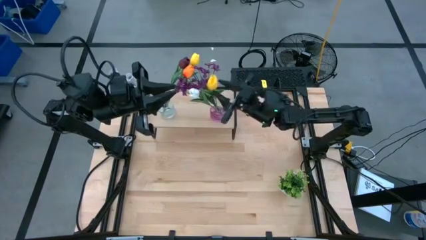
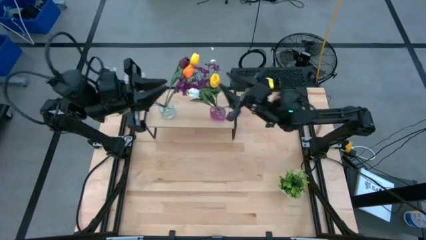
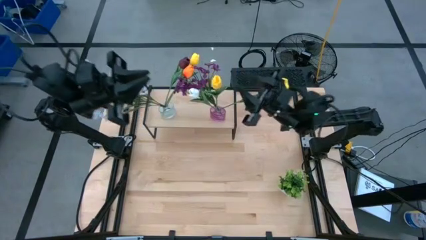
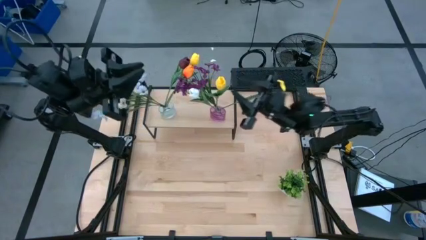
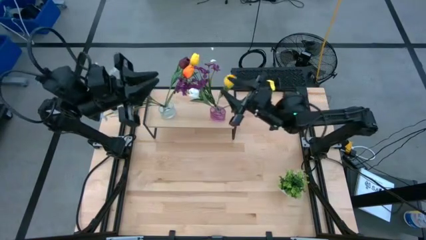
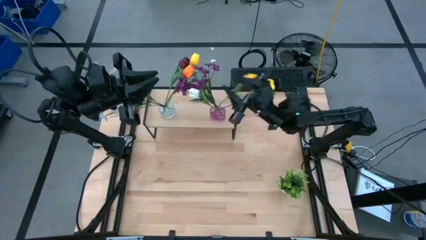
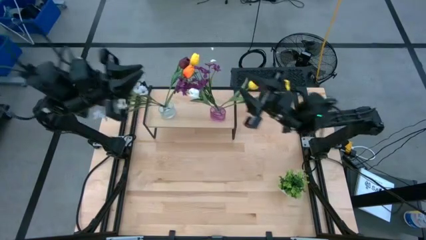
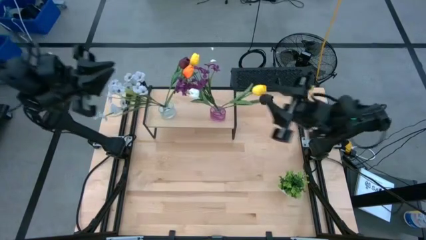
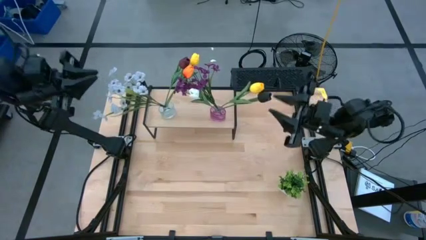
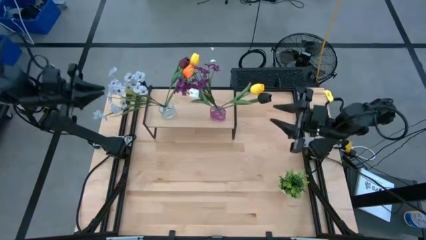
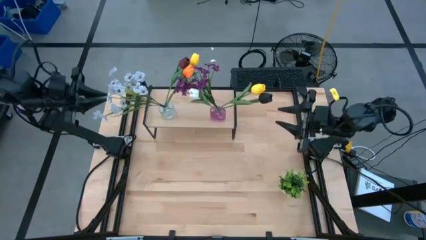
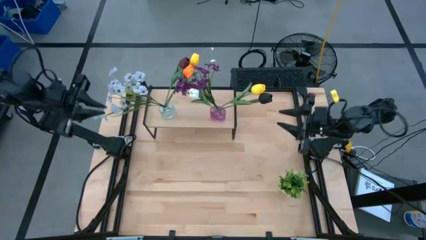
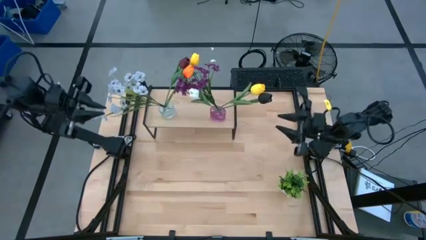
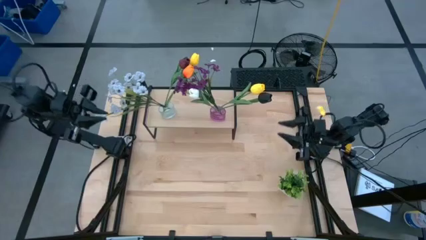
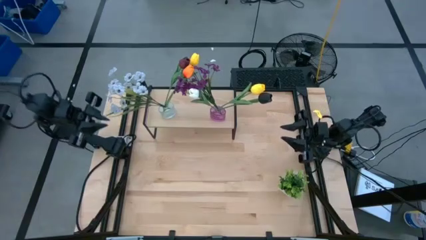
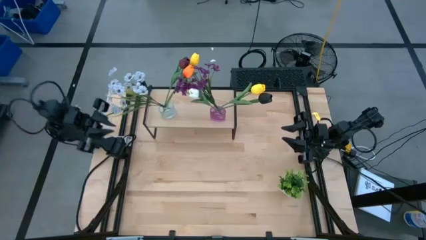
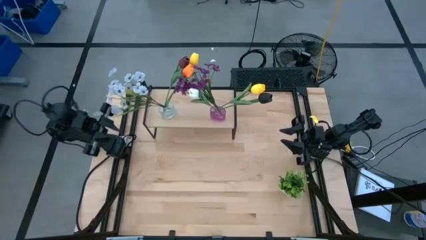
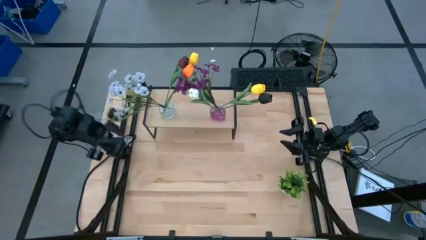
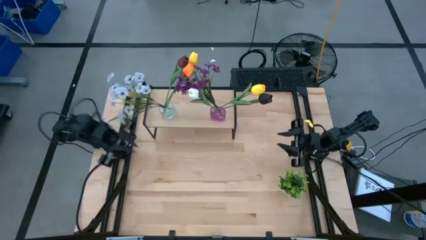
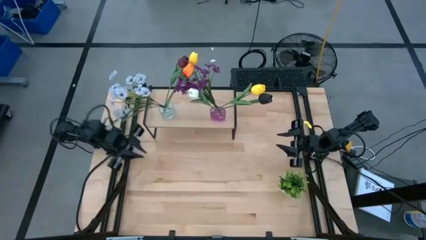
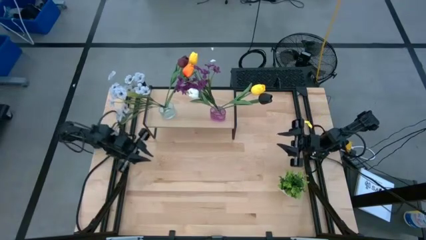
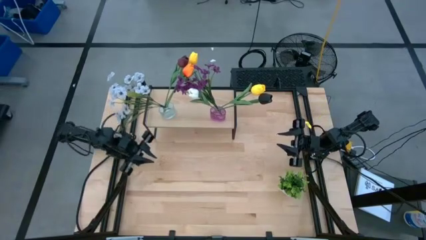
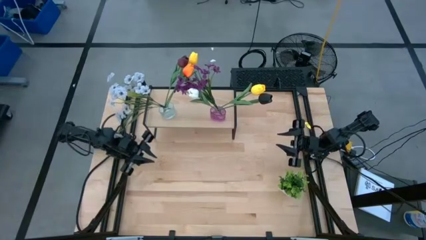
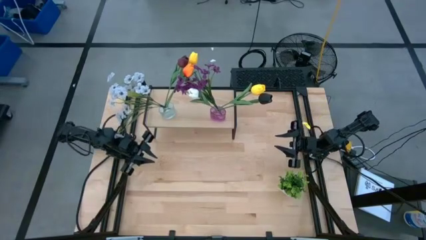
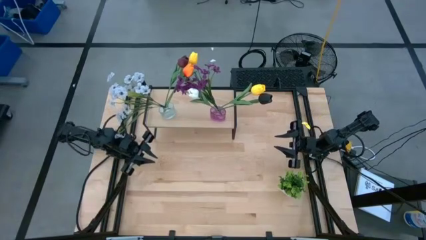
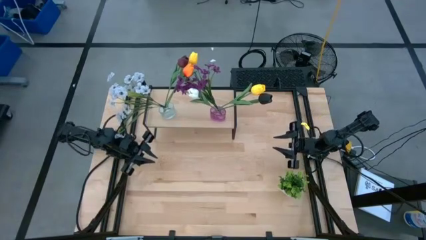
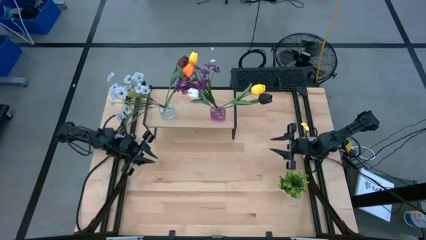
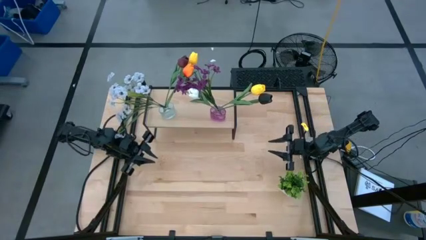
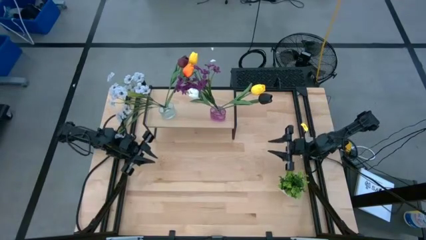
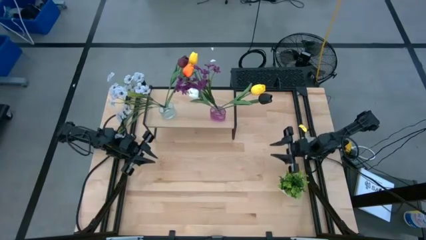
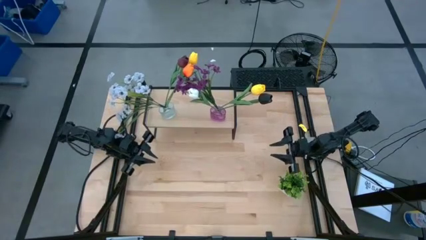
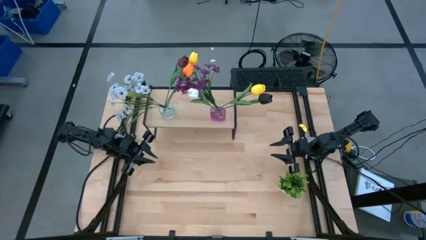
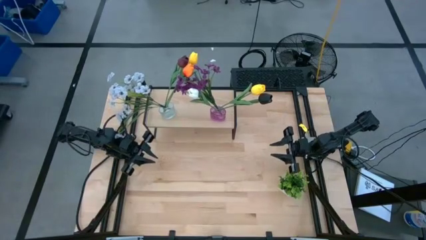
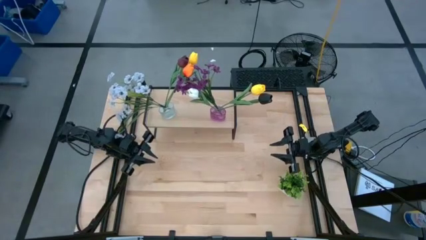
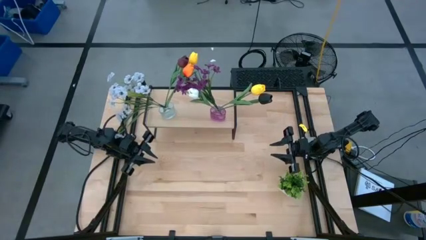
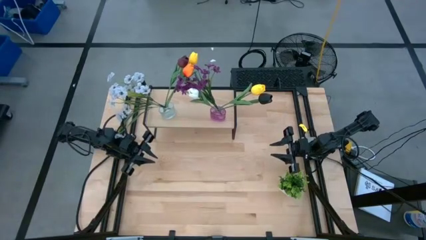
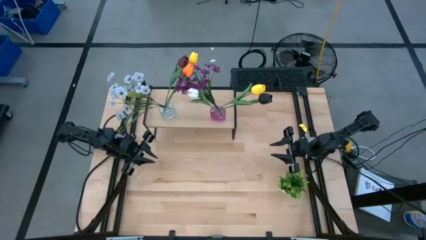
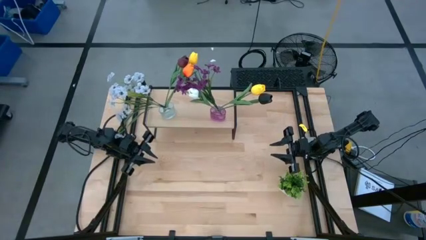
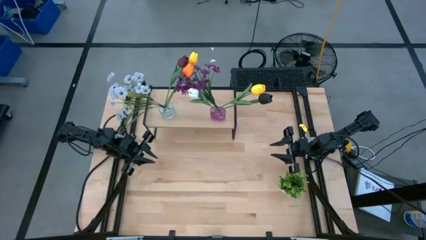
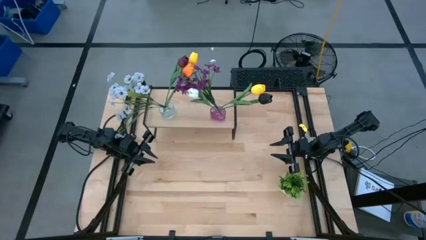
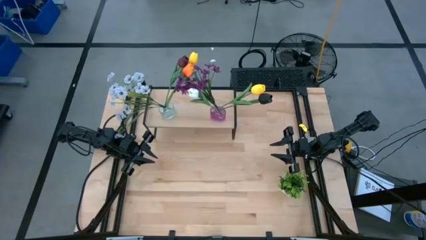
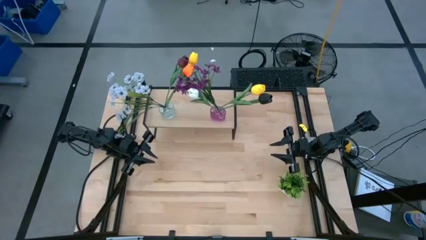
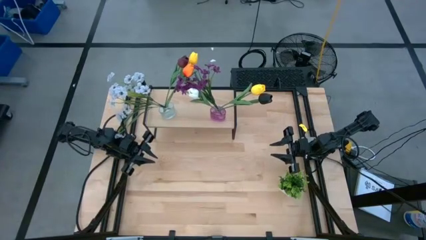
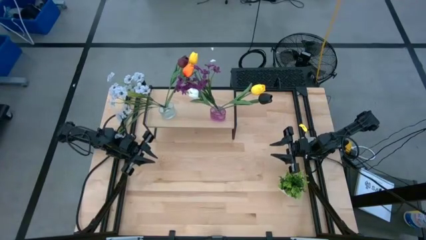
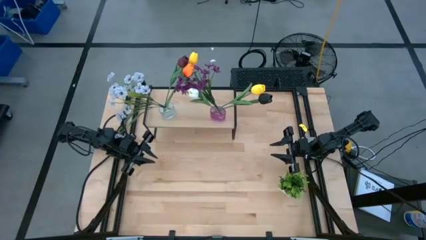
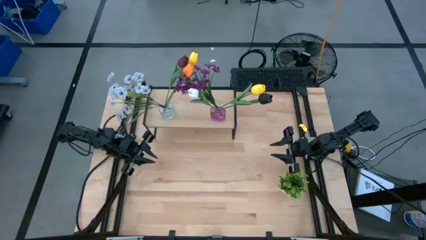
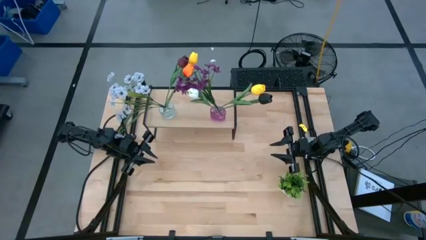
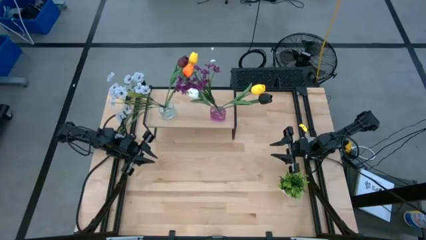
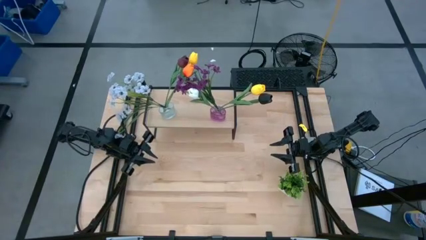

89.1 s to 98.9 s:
Task: Pick and place flowers into a vace then onto a shelf
Return to Home Position

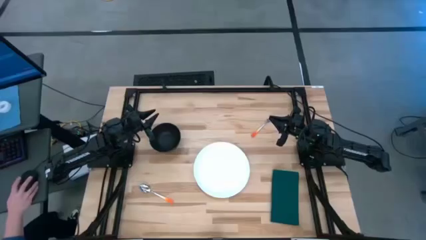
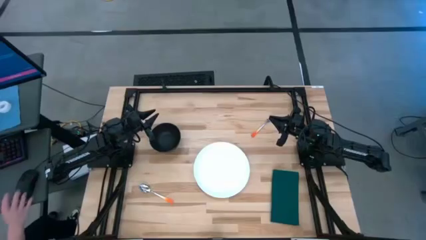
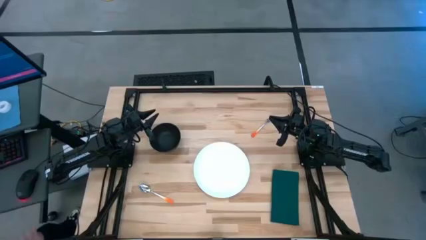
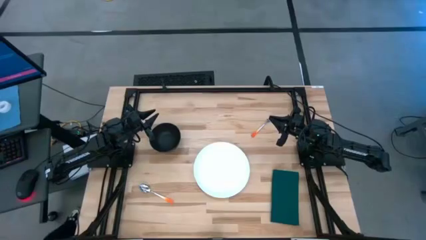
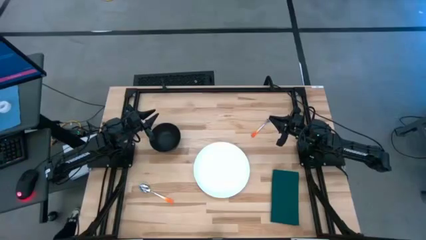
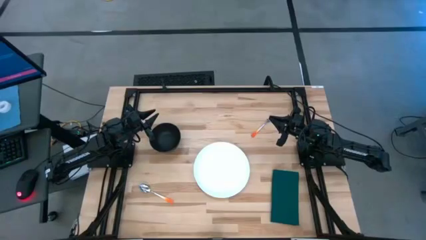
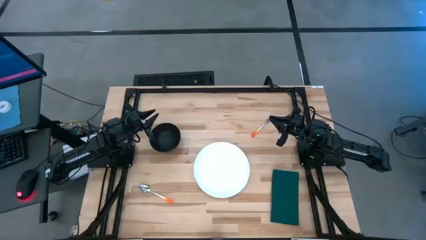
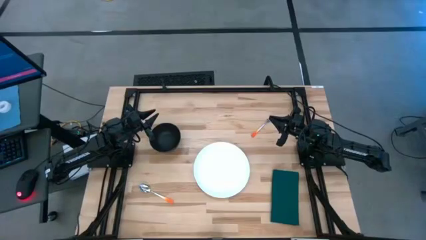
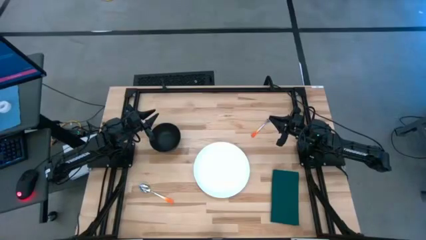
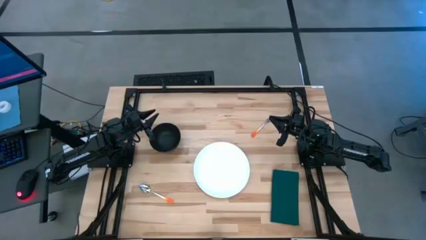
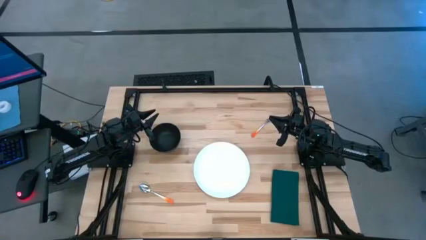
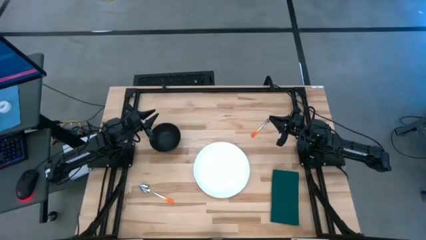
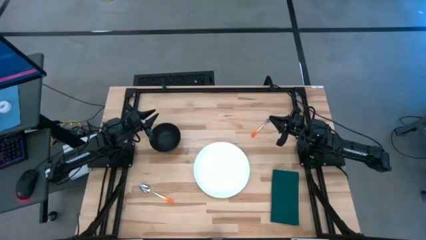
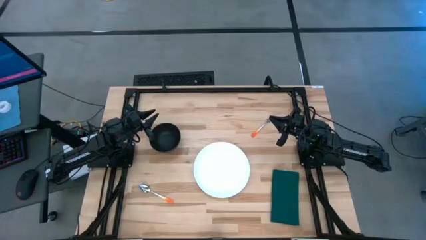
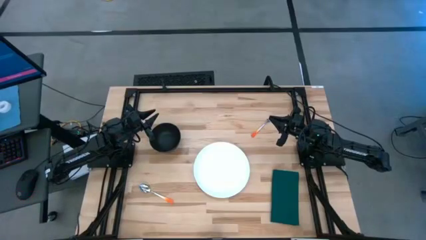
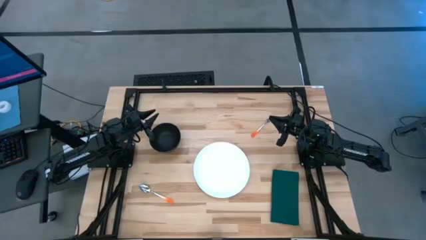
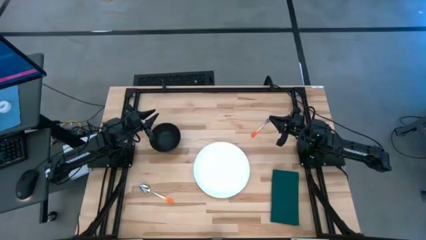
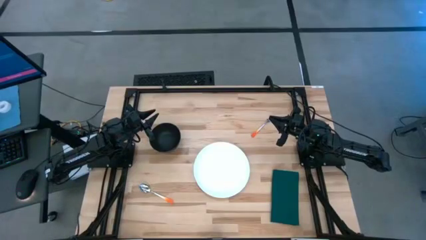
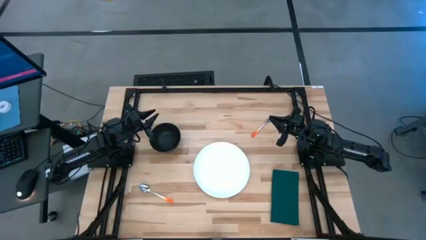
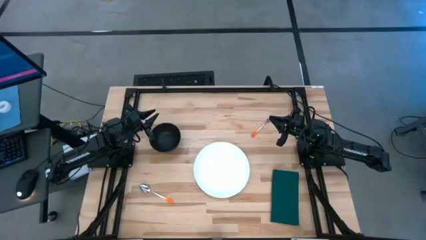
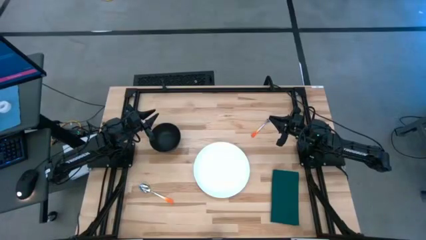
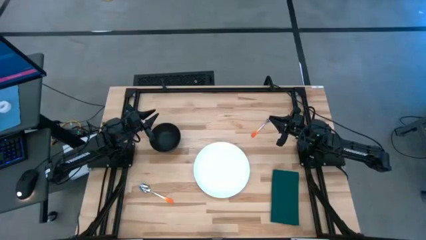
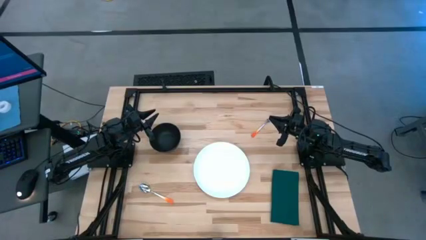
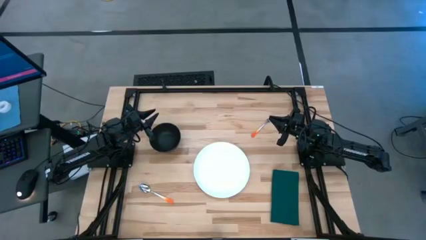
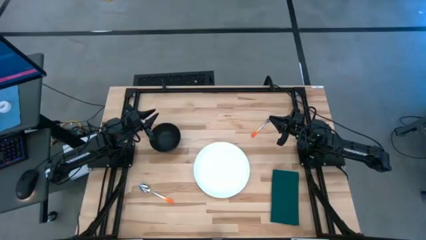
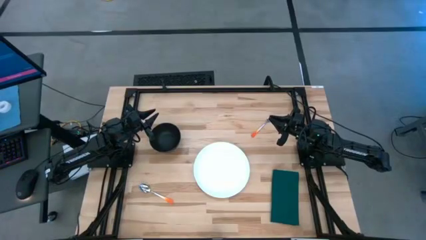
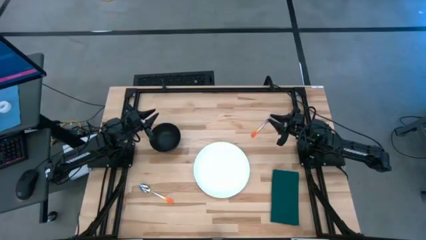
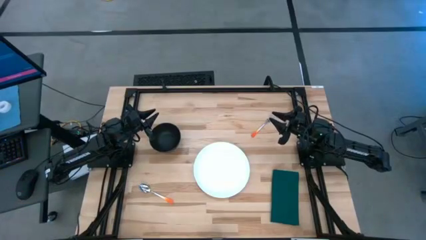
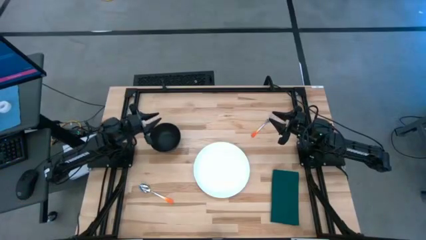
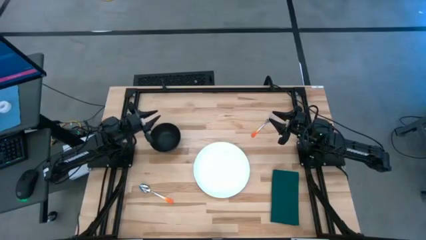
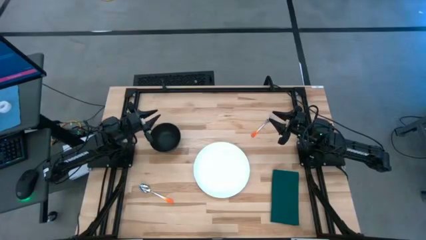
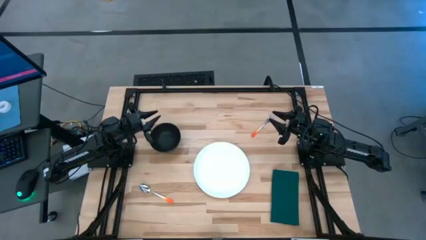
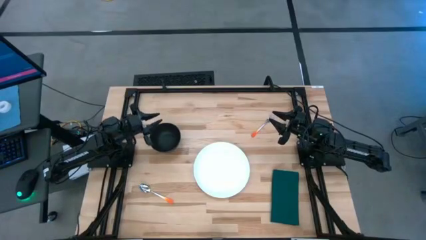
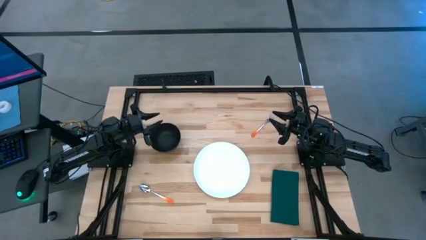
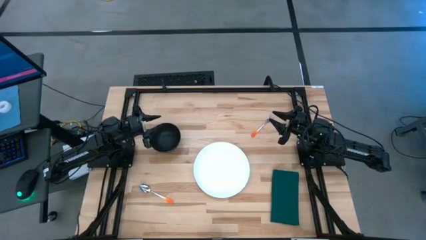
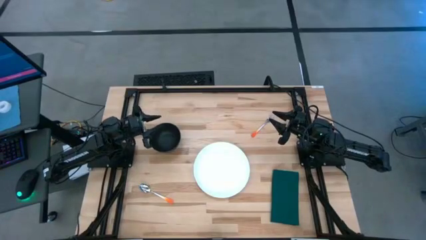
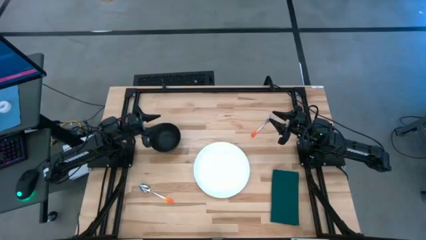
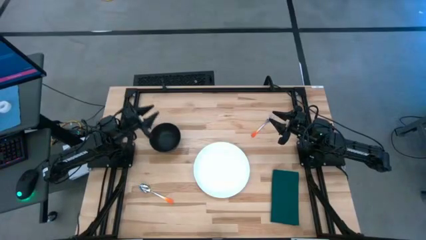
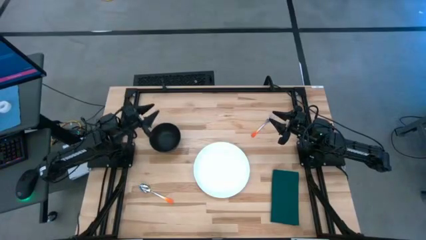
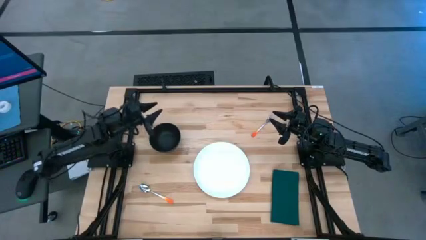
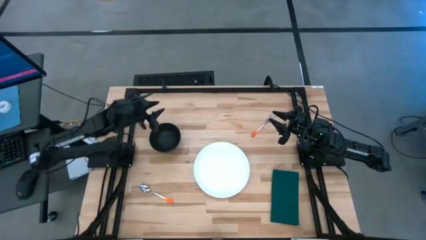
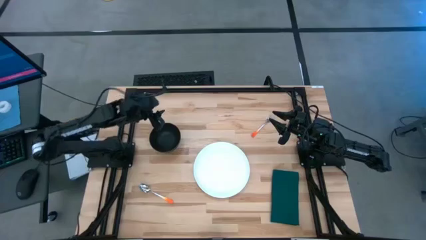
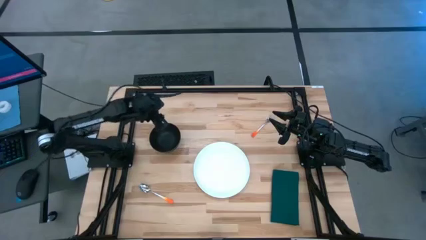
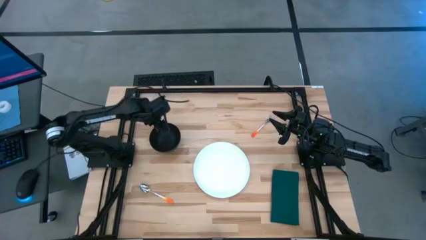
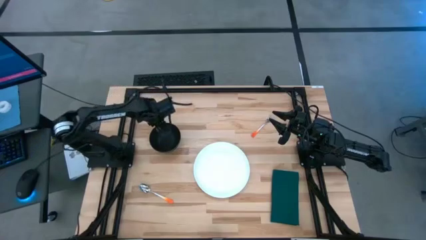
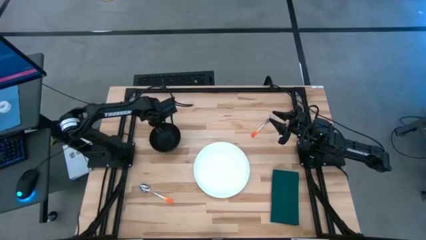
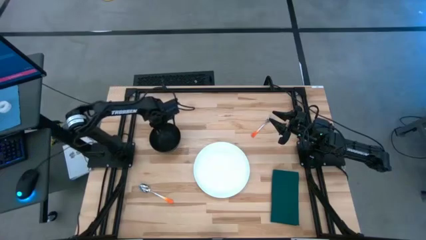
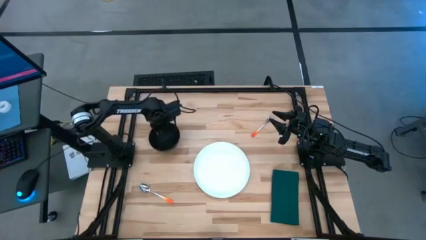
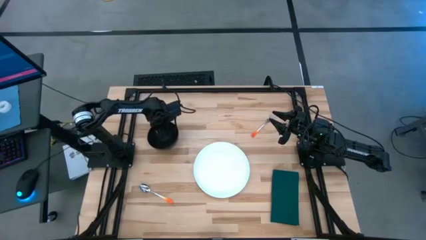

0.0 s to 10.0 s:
Task: Set table place
Place the black bowl on the white plate
